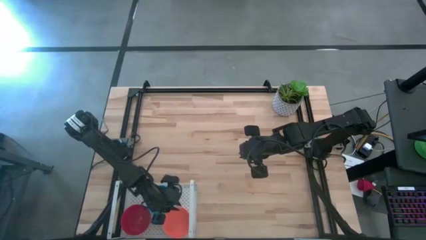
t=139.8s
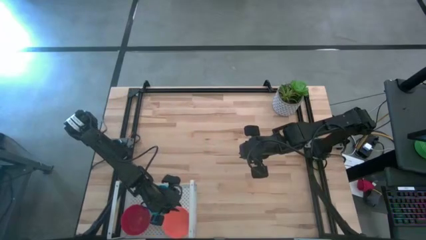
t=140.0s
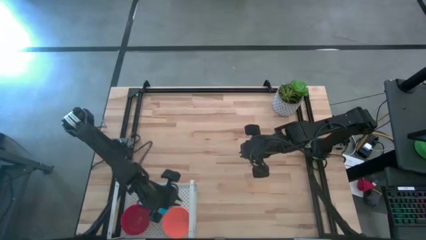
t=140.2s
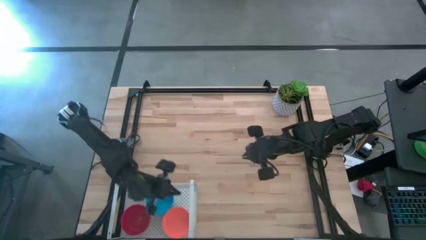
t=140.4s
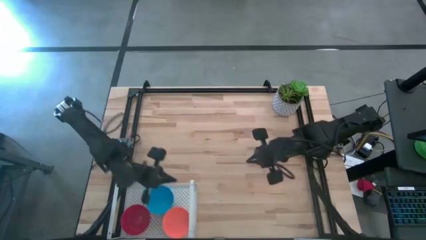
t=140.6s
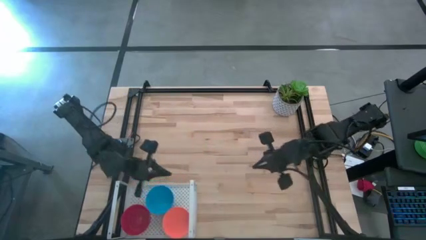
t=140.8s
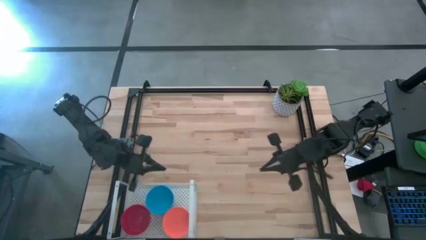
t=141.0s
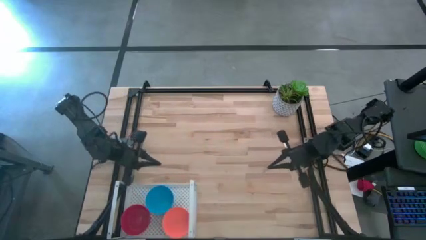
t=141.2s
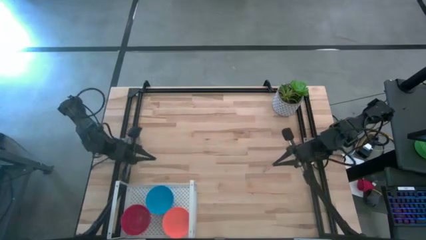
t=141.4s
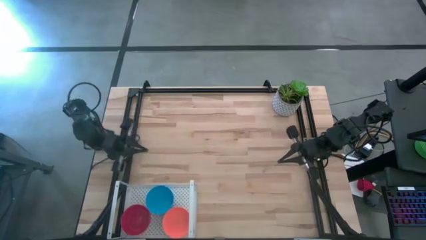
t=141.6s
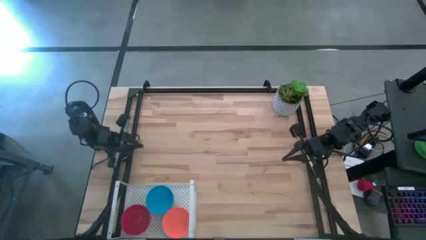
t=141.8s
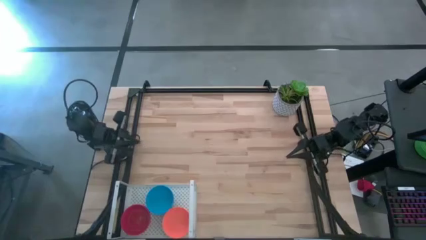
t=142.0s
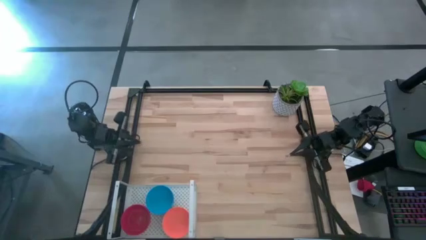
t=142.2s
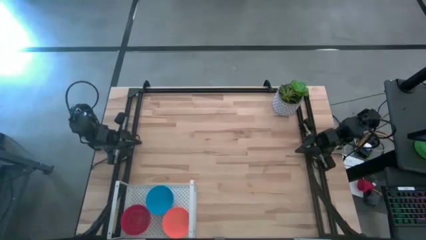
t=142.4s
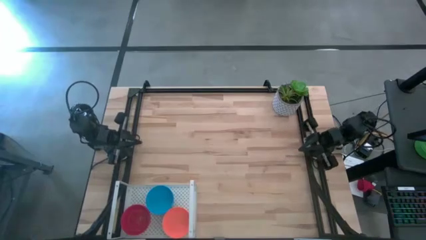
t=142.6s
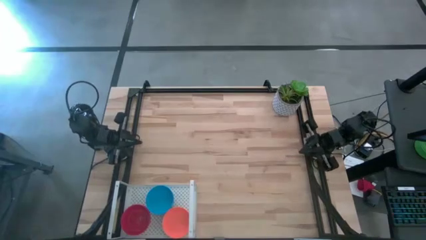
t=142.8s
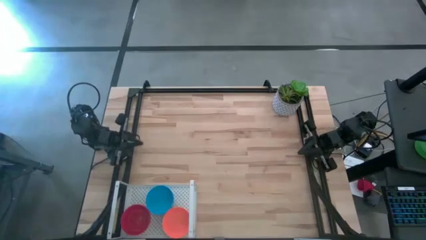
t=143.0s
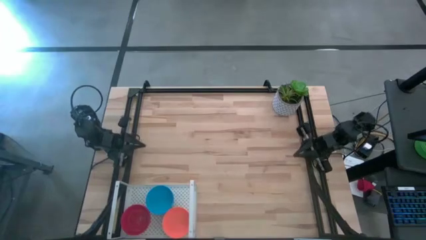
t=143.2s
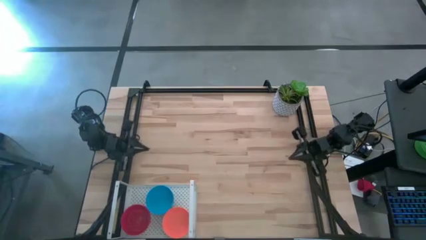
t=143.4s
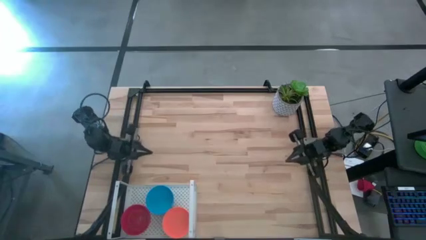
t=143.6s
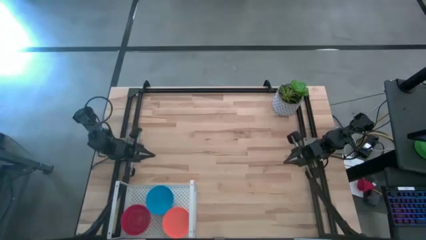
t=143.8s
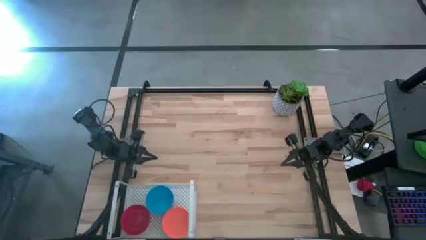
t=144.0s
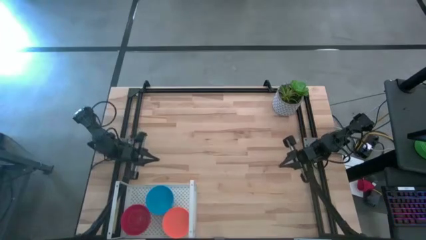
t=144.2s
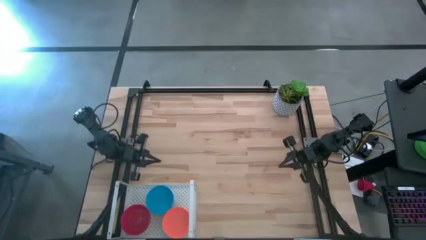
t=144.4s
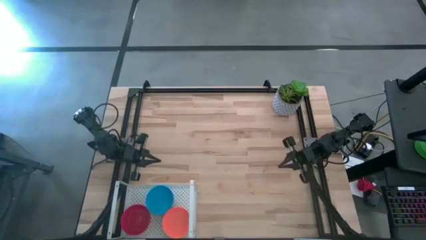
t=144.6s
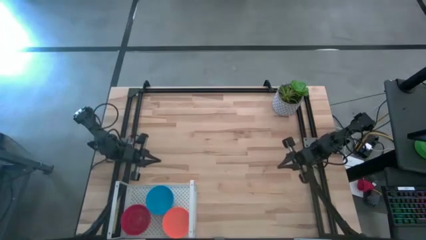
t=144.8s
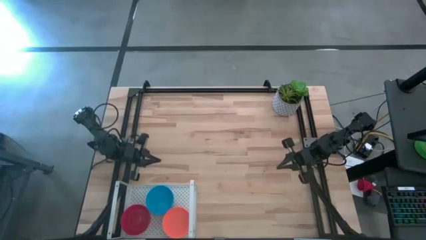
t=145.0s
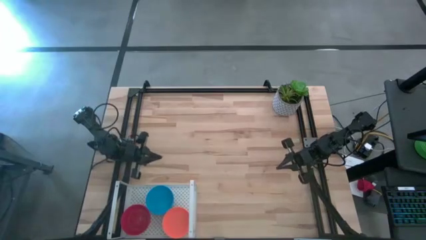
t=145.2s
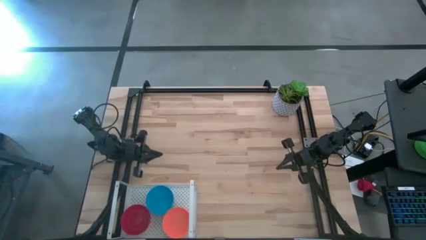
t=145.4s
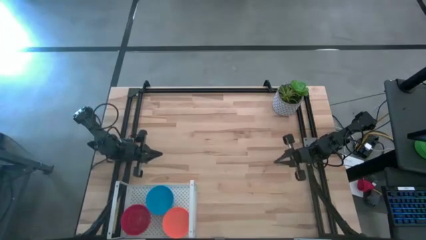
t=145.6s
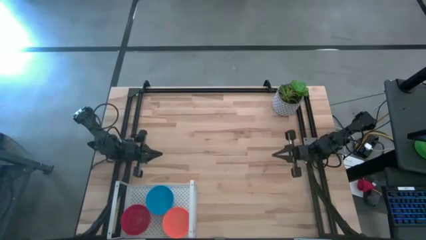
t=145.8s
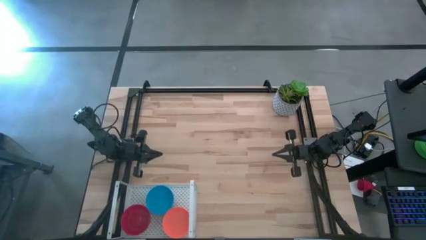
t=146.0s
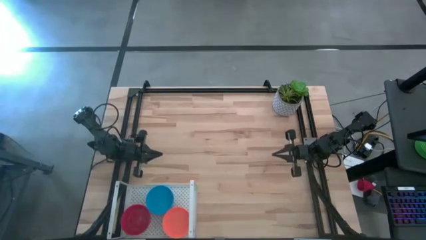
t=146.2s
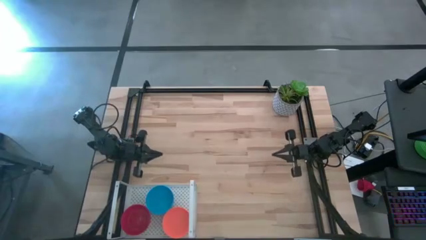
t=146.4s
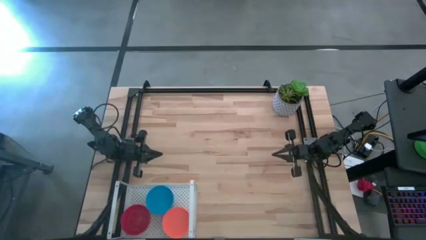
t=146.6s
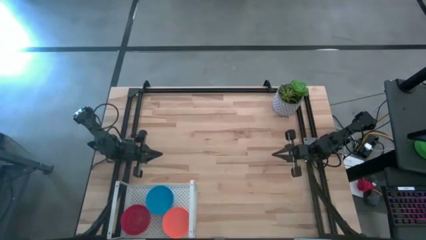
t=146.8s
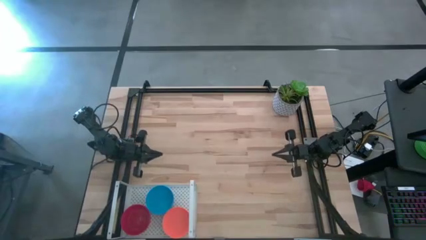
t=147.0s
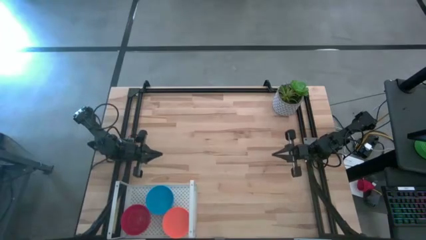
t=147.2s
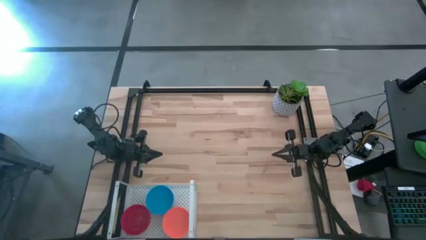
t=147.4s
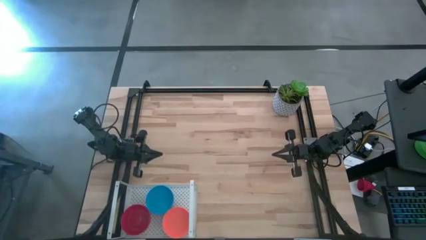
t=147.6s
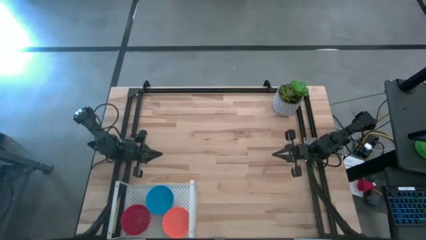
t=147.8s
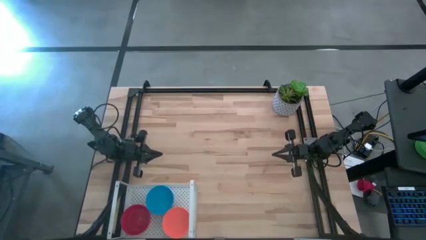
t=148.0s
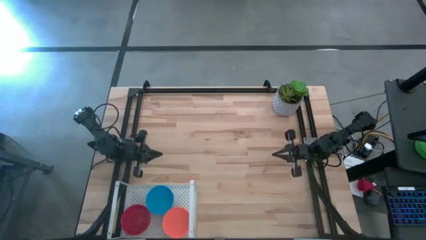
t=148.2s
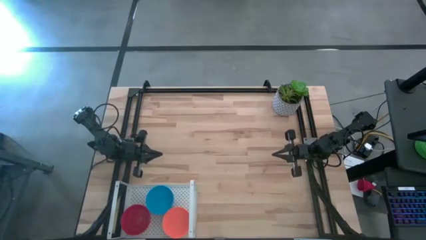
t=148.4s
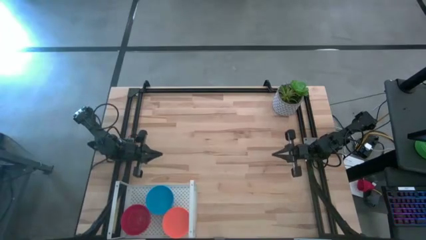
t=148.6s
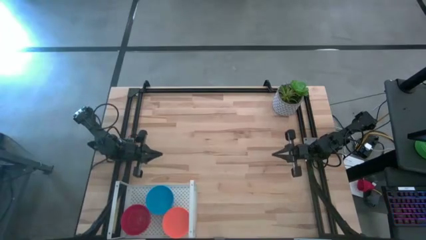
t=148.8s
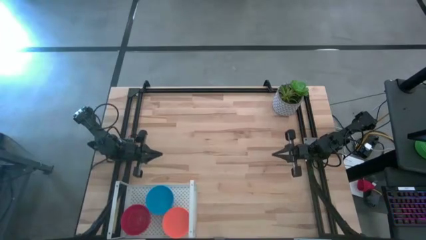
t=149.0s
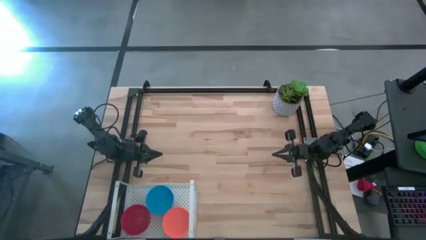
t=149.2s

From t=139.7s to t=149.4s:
Task: Pick & Place Mini bowls
Return to Home Position

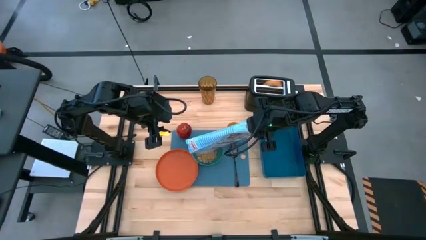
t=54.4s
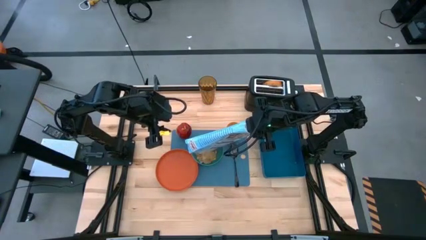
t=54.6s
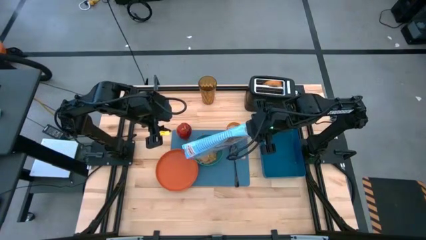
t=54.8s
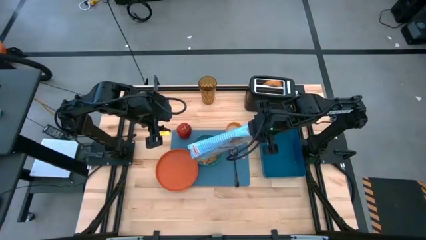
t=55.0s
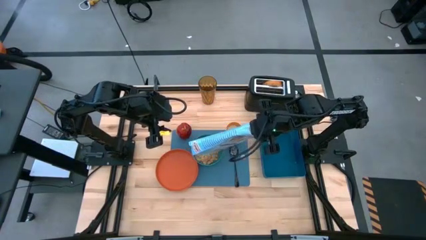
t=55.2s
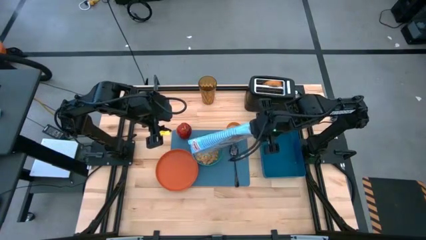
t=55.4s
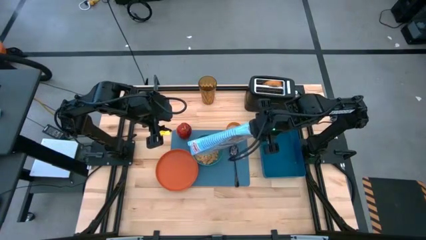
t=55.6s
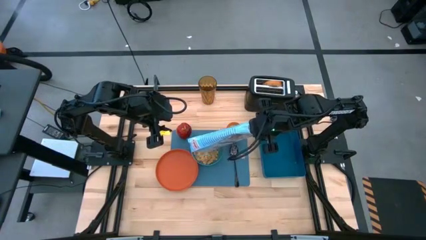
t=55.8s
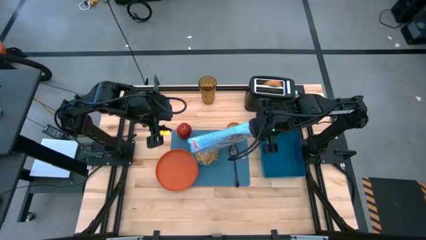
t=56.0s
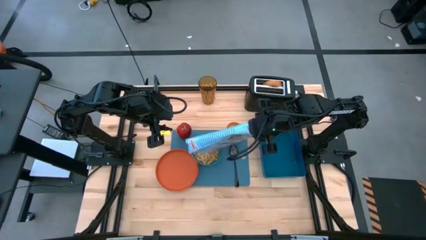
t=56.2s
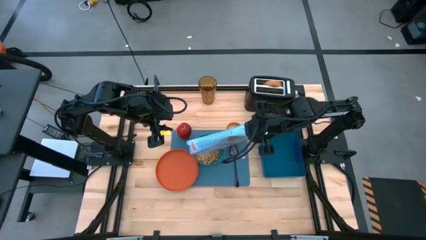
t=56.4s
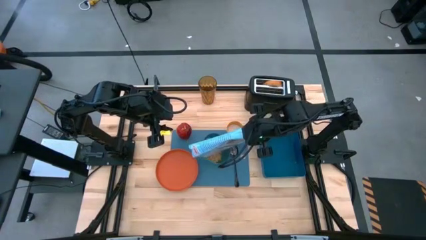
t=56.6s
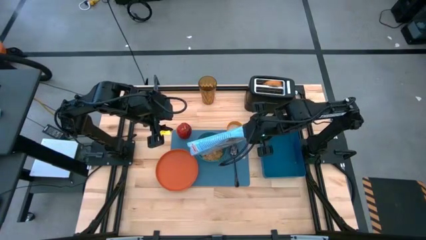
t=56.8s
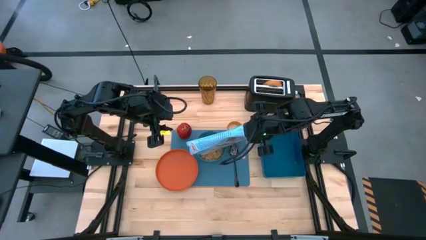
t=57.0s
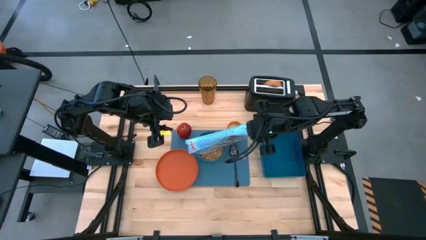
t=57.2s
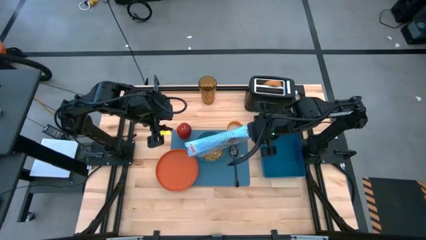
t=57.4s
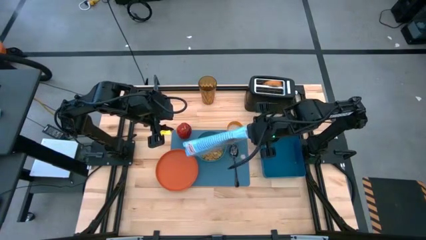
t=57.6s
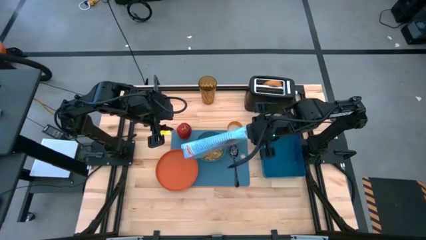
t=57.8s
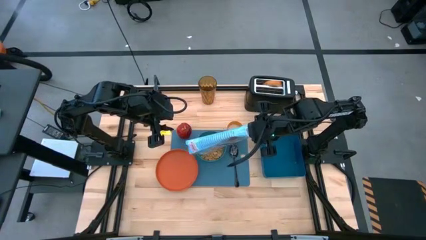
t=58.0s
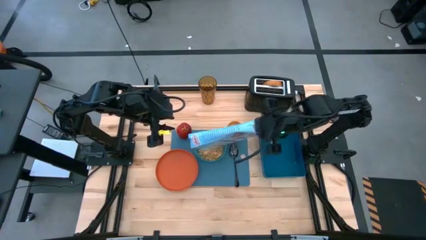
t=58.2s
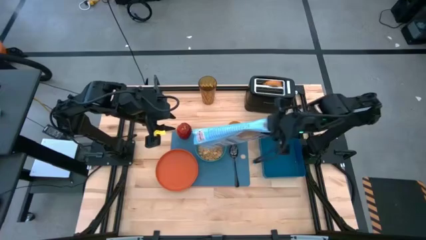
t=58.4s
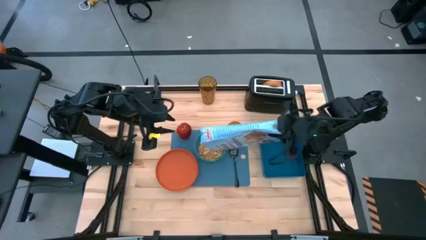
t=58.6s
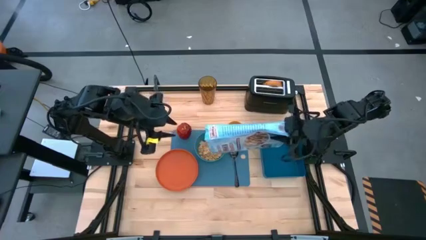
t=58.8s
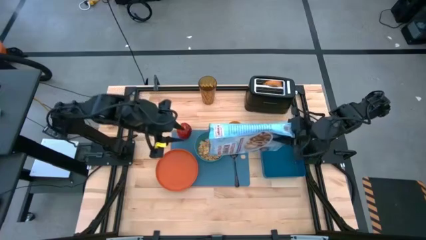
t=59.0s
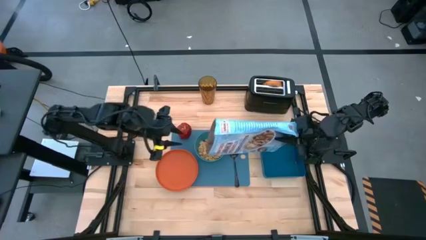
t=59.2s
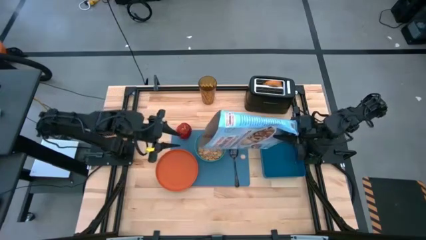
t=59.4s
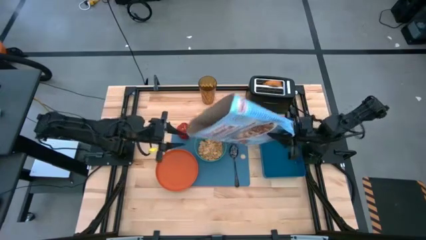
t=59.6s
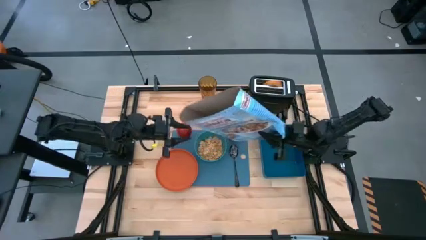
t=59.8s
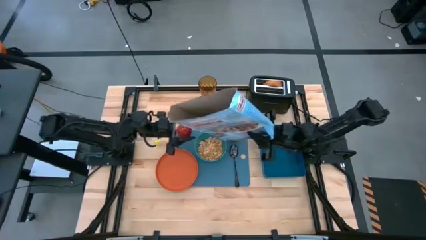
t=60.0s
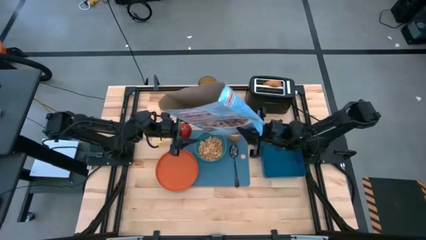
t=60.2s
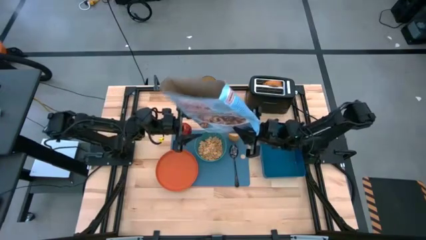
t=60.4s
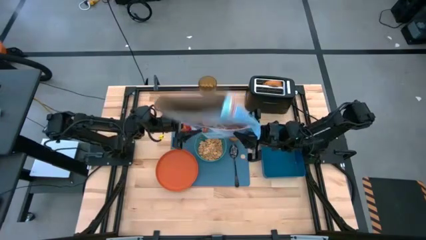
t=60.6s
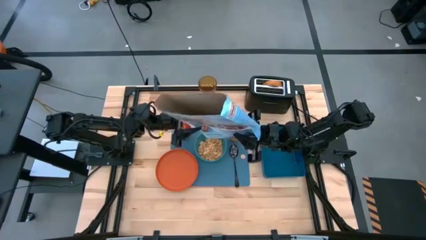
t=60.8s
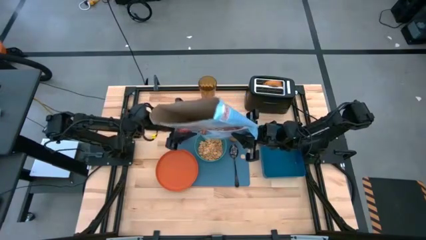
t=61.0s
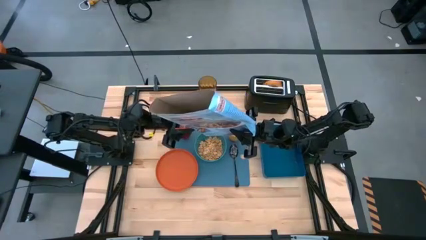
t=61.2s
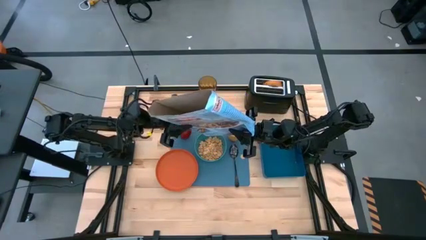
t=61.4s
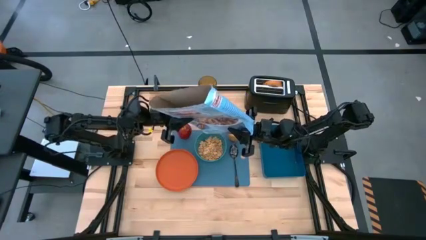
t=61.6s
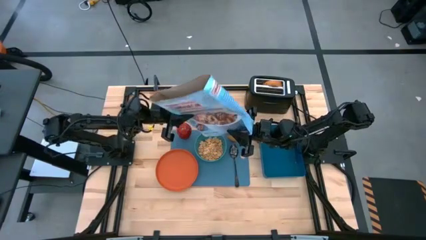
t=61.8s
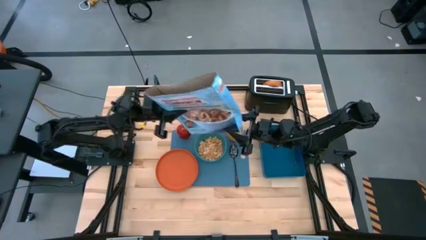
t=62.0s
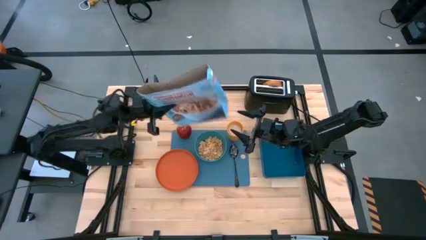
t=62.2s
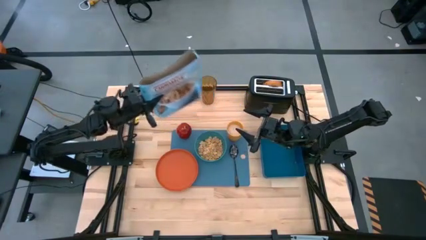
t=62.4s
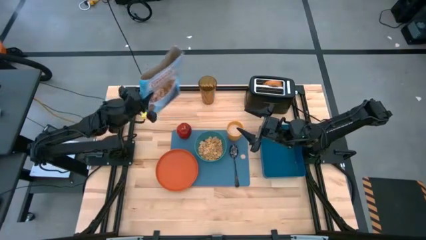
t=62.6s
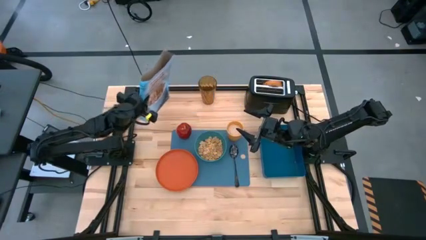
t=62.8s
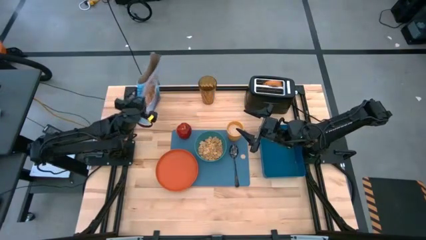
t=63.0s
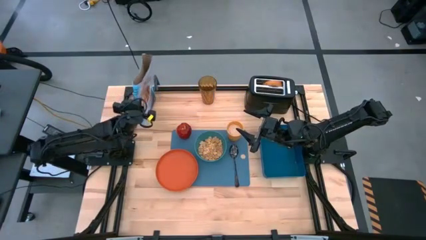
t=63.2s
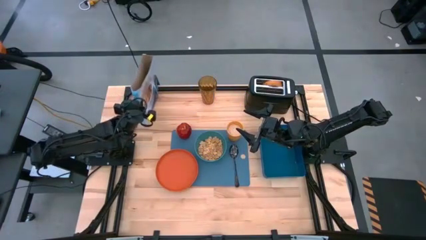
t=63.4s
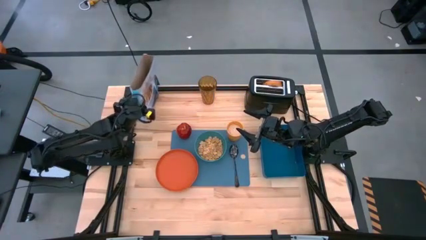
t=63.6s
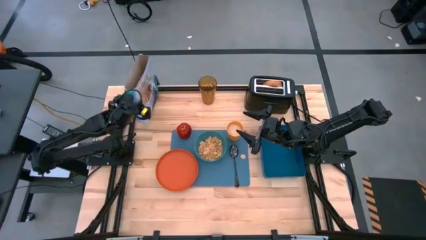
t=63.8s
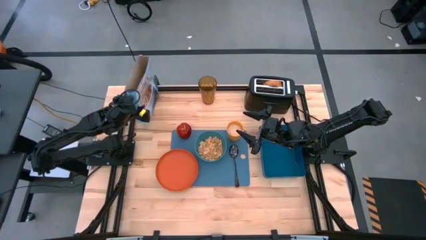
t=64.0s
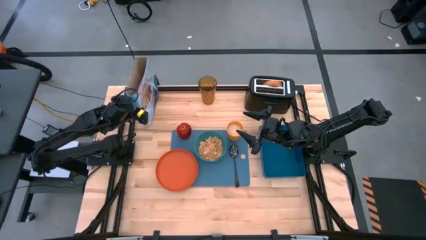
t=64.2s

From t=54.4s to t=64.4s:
Task: Arrange a breakfast setting
Pour the cereal from the cereal box into the green bowl
